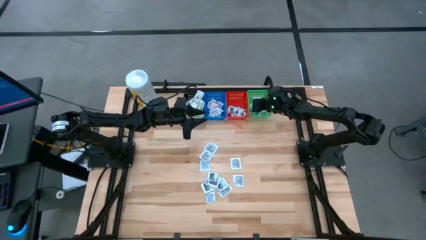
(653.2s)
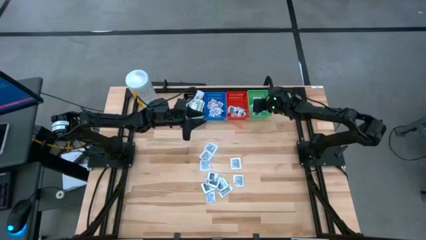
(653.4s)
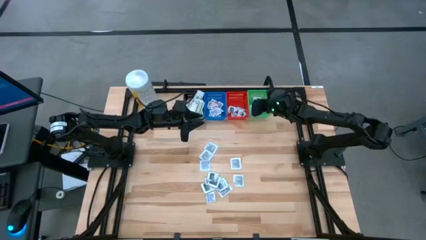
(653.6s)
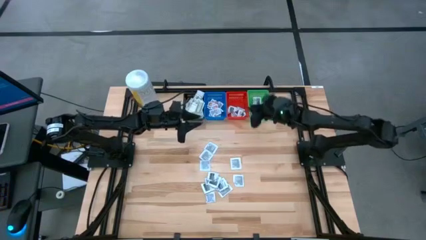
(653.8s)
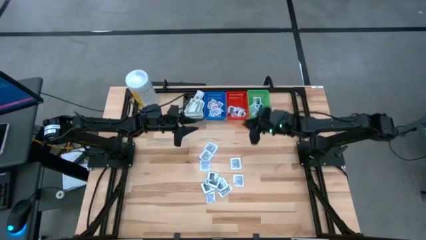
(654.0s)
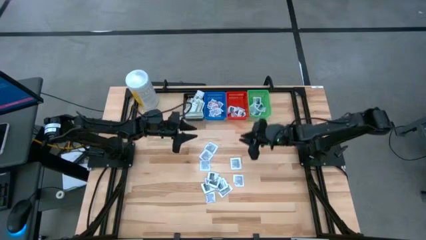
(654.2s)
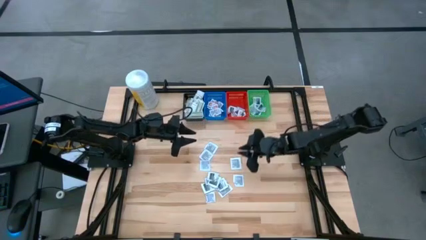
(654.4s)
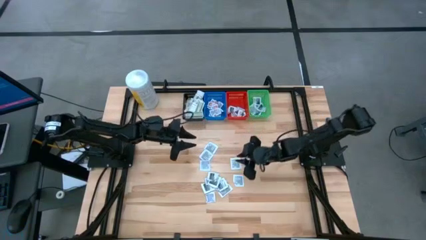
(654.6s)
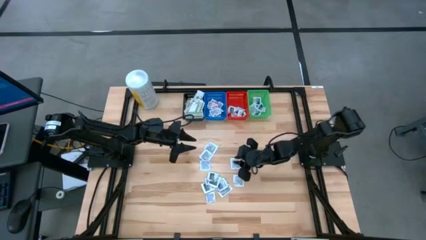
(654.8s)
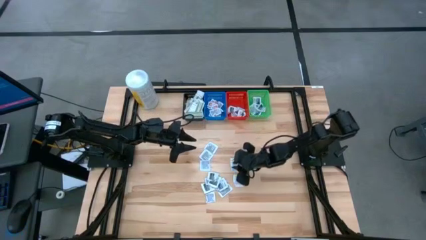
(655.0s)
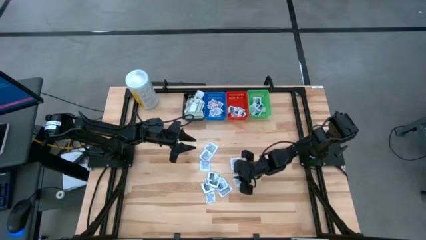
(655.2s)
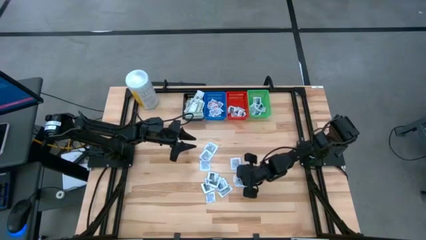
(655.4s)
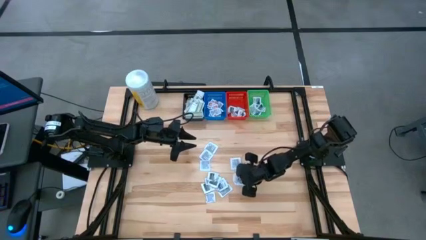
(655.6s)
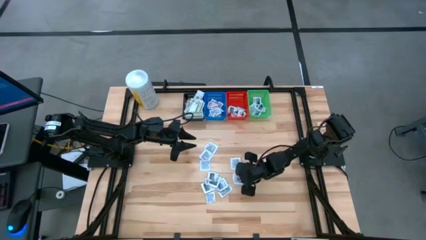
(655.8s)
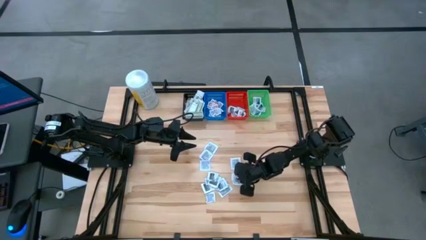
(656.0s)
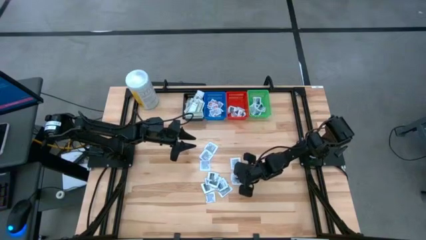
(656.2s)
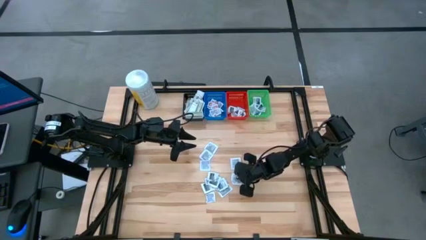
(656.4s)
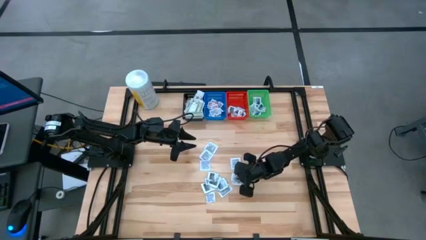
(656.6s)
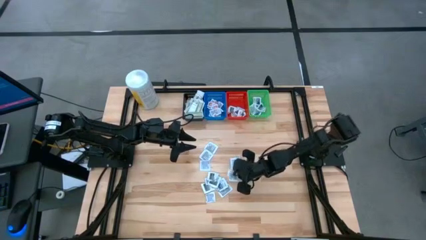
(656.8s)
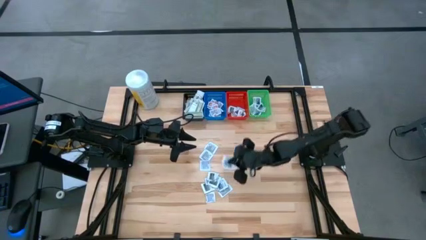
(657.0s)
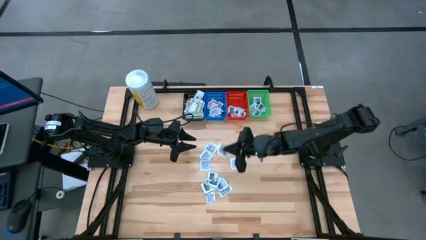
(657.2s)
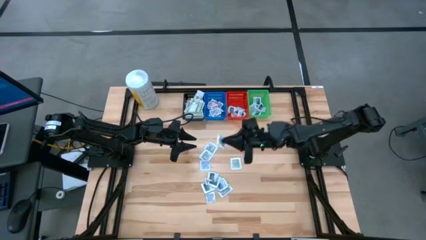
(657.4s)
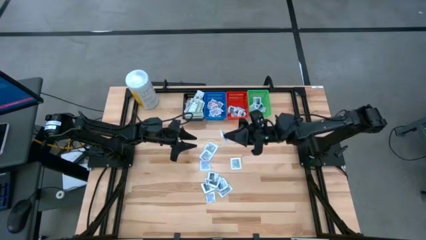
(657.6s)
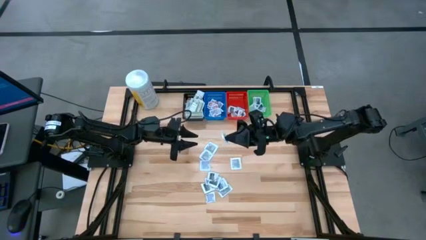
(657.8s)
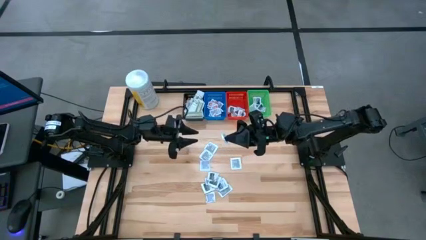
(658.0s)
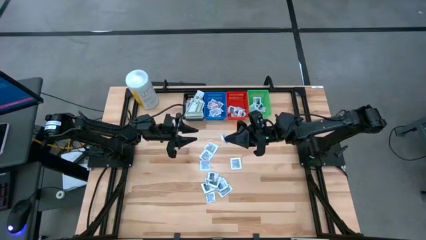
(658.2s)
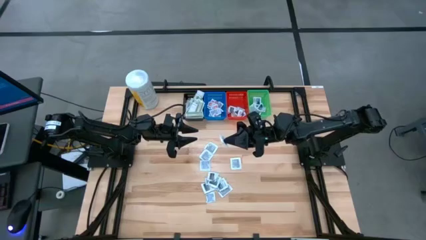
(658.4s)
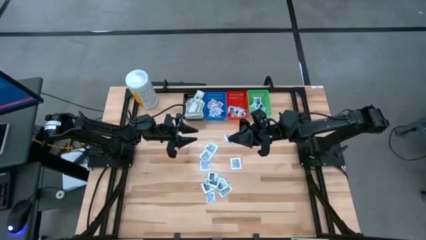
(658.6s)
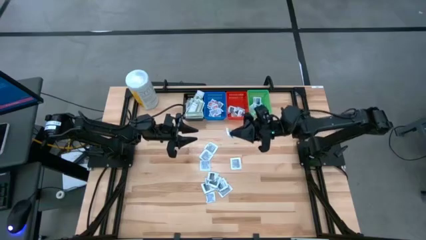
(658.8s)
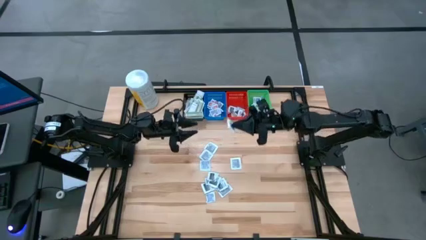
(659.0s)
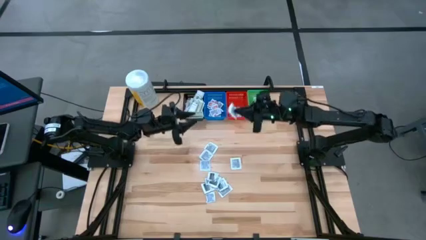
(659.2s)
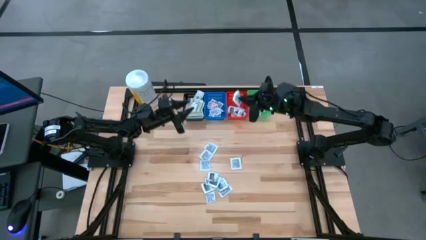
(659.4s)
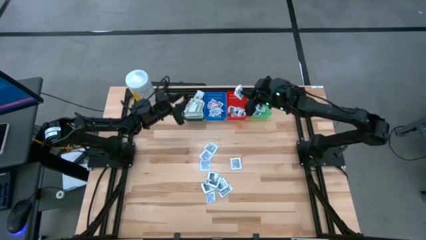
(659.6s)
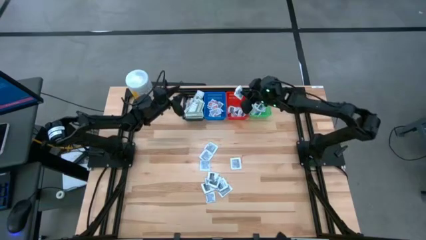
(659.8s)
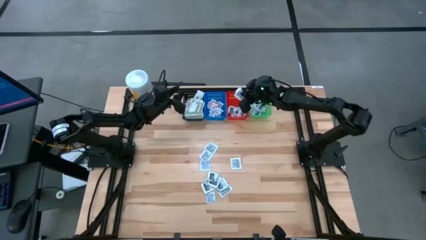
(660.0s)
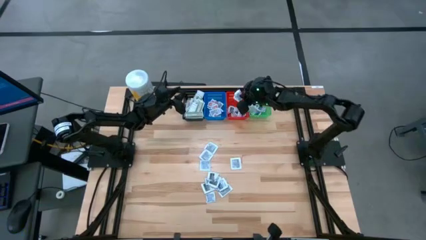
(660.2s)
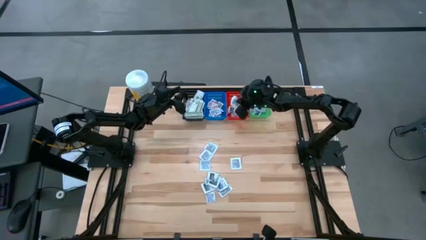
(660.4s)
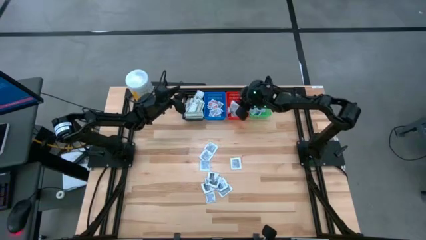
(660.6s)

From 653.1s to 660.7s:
Task: Pick & Place First Aid Supplies
Put the gray towelette pack in the red bin

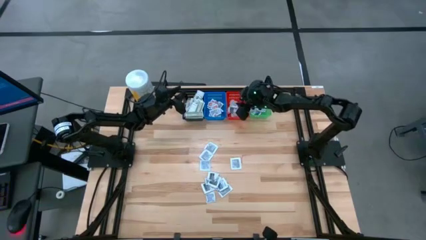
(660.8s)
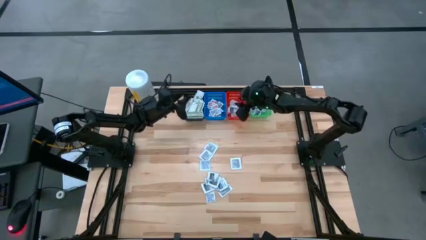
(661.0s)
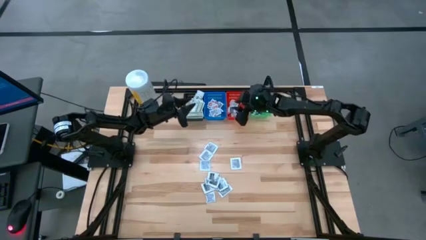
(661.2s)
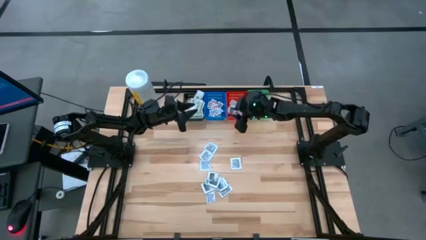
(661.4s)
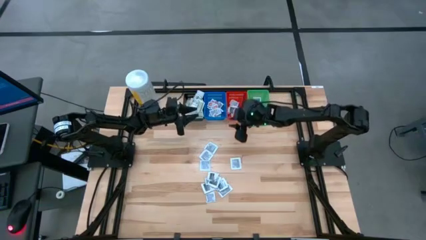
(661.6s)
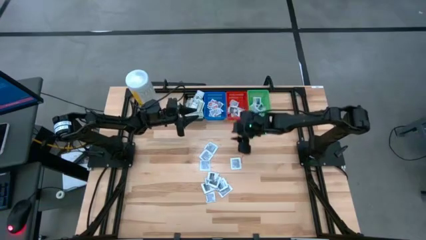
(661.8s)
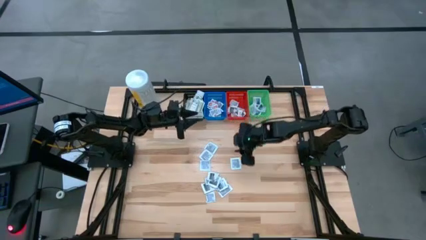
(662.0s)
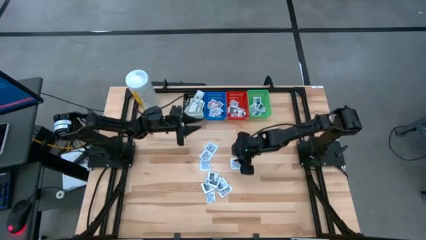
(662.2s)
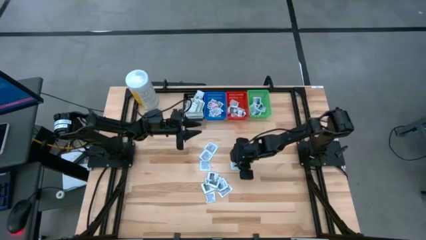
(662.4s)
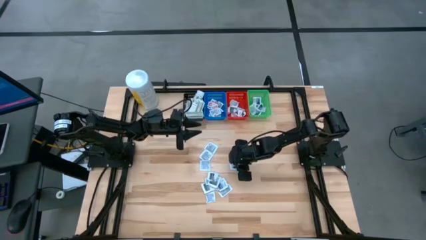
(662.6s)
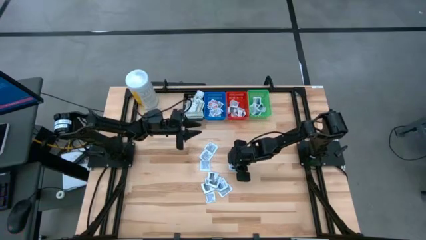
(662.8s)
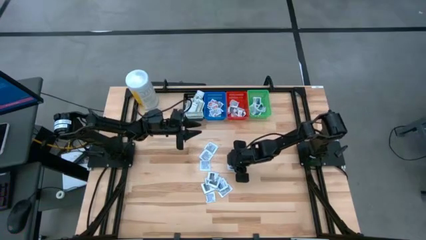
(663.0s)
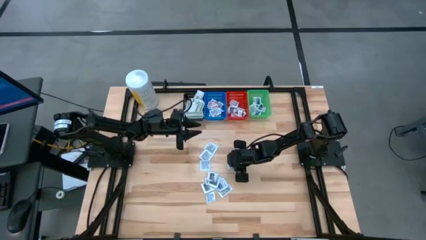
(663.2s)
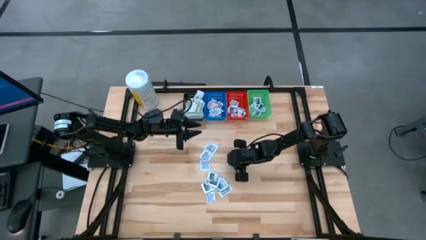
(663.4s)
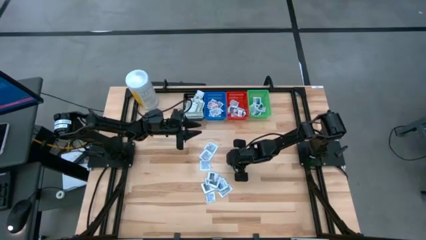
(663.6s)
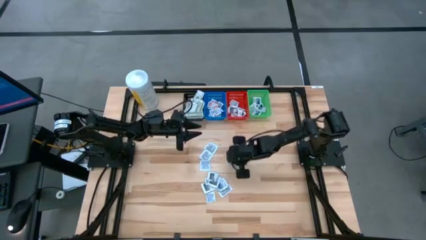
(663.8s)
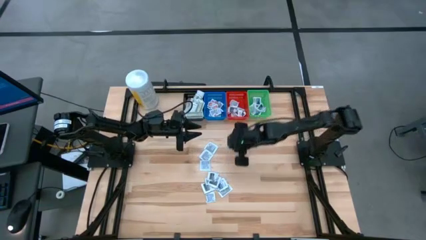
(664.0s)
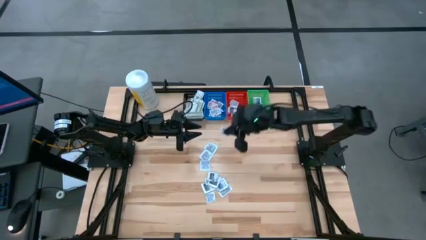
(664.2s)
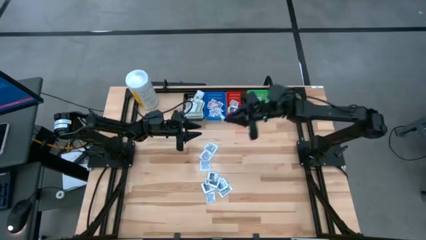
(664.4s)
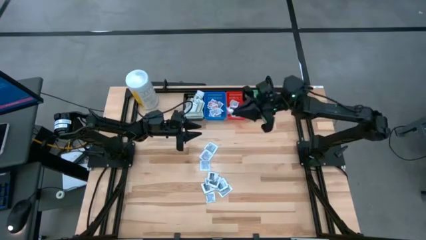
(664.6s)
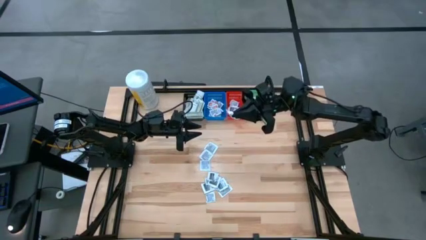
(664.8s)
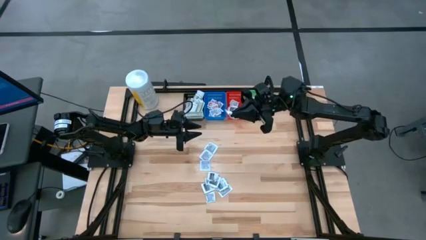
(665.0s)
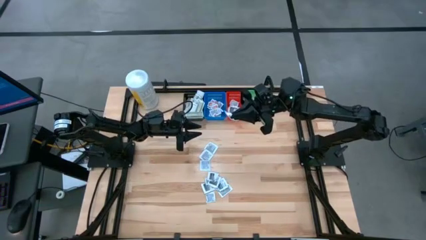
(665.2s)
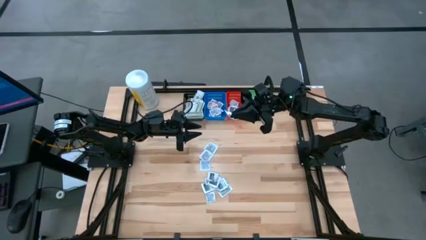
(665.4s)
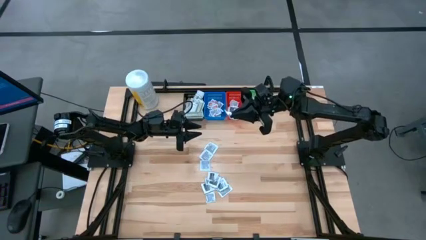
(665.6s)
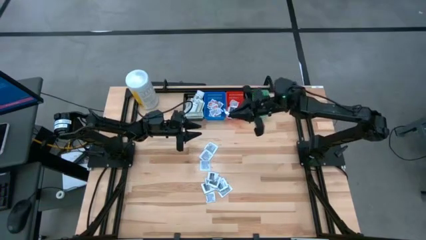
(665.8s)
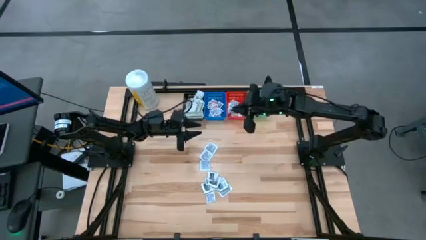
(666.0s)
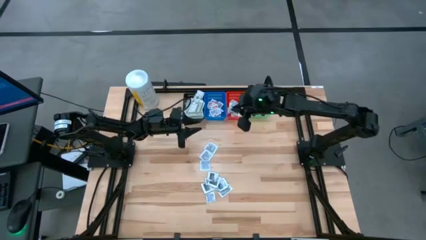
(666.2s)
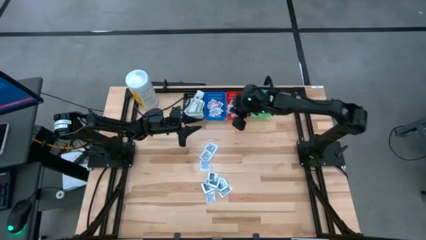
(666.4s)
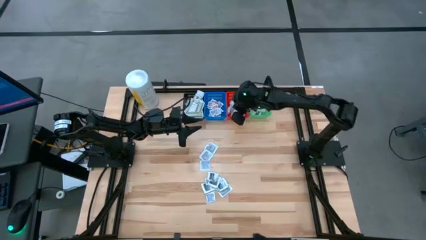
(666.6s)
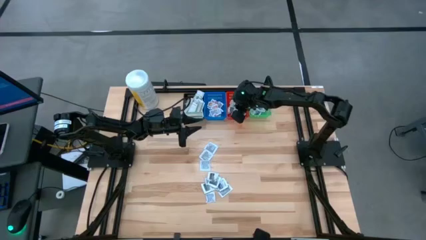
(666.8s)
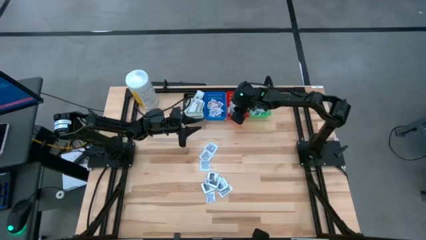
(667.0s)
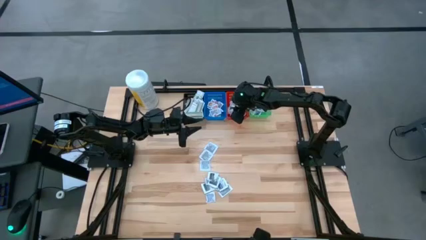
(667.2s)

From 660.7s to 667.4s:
Put the gray towelette pack in the red bin
